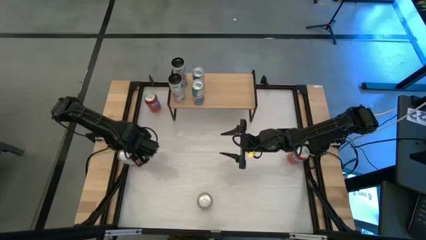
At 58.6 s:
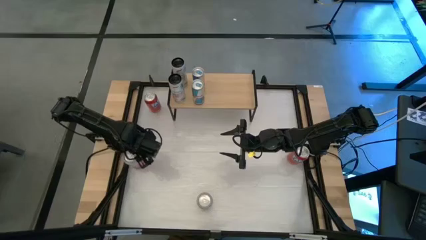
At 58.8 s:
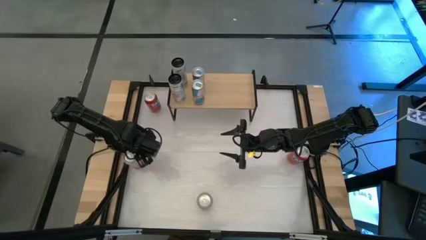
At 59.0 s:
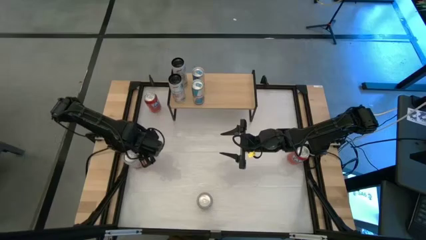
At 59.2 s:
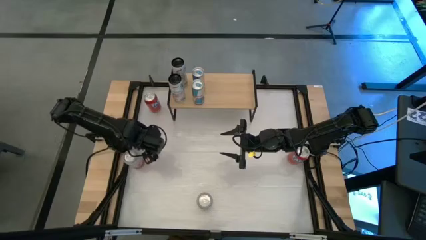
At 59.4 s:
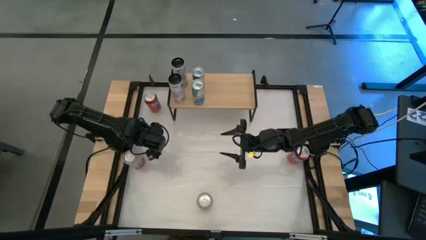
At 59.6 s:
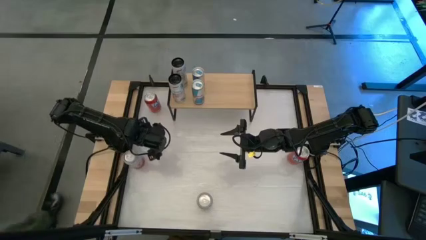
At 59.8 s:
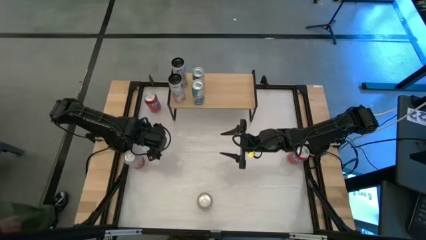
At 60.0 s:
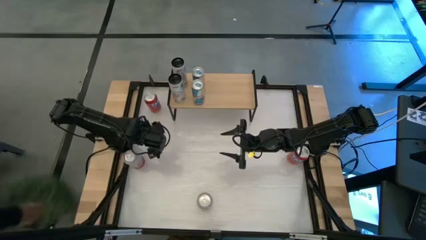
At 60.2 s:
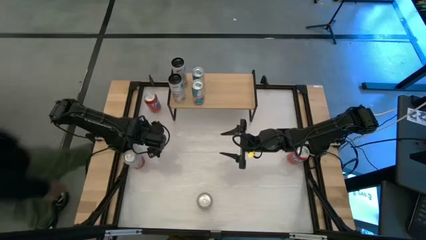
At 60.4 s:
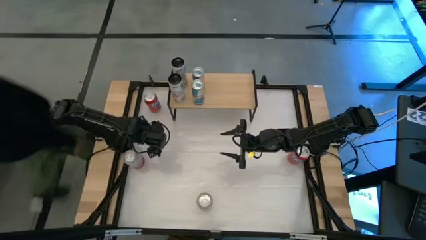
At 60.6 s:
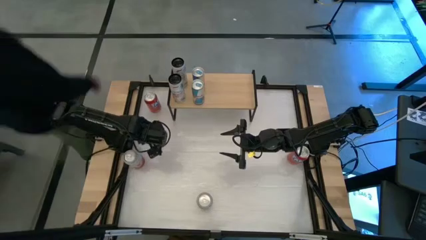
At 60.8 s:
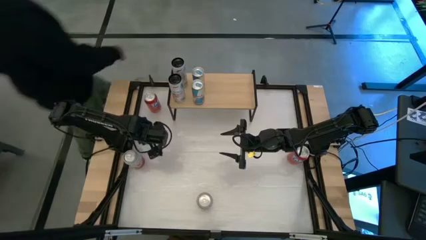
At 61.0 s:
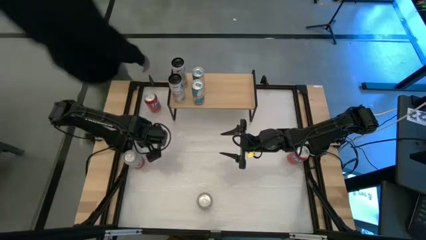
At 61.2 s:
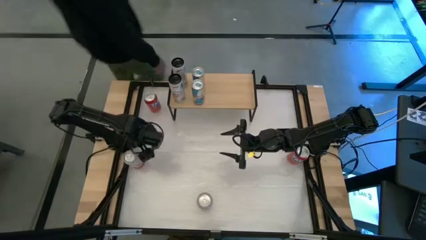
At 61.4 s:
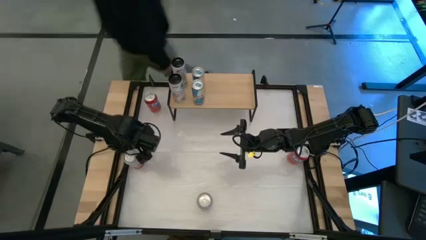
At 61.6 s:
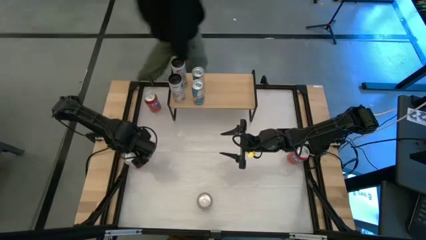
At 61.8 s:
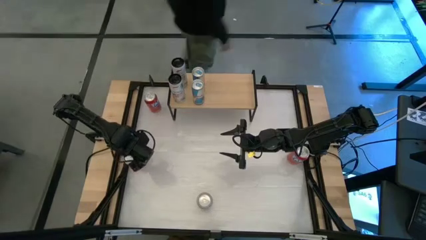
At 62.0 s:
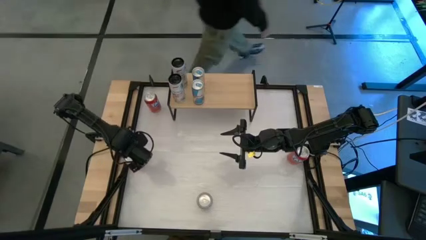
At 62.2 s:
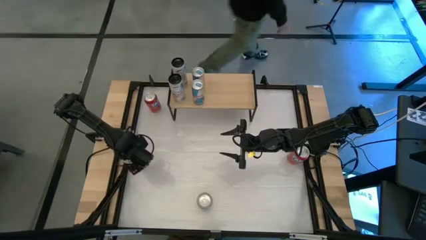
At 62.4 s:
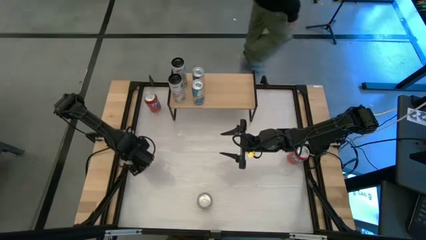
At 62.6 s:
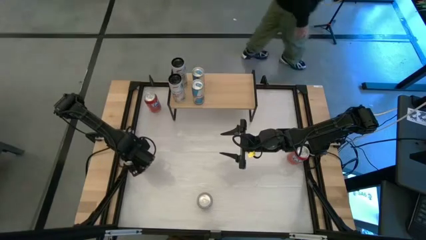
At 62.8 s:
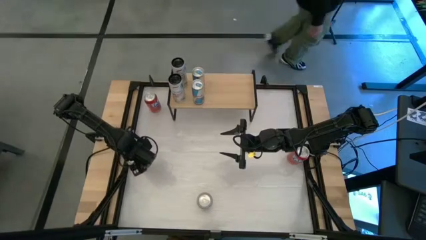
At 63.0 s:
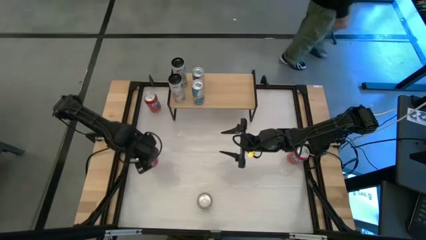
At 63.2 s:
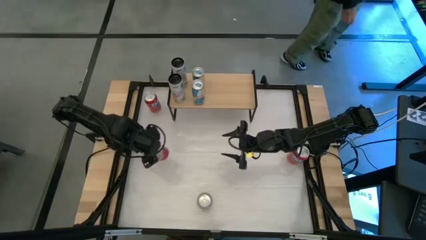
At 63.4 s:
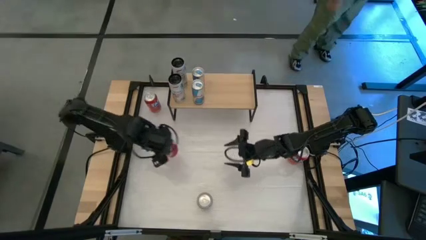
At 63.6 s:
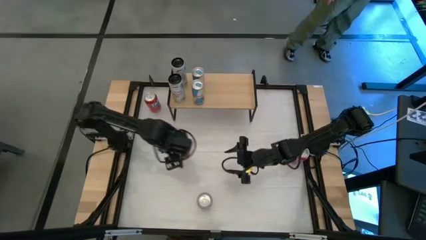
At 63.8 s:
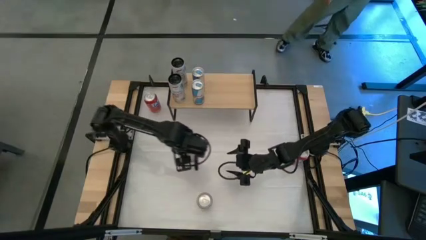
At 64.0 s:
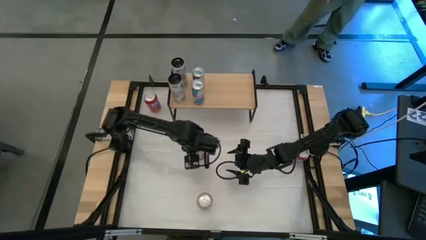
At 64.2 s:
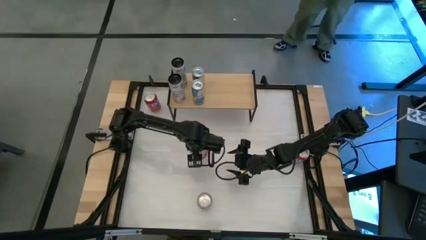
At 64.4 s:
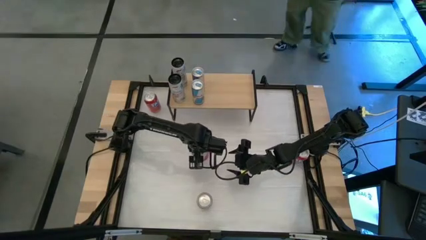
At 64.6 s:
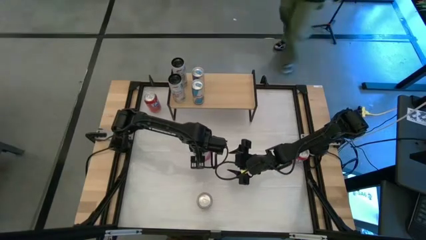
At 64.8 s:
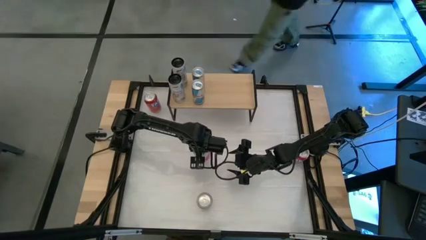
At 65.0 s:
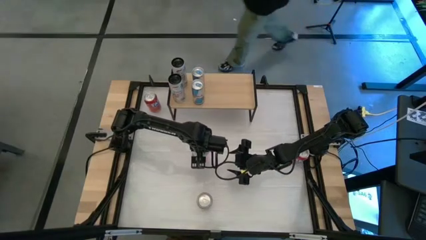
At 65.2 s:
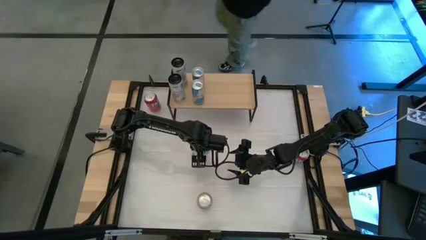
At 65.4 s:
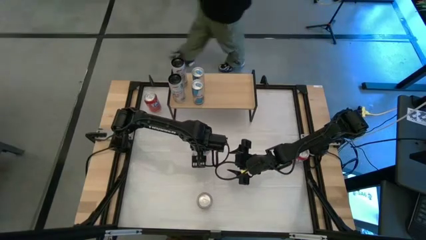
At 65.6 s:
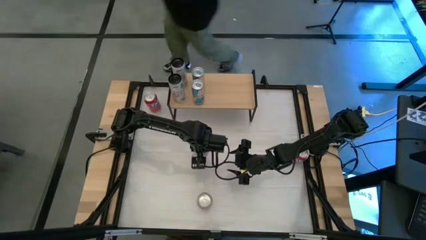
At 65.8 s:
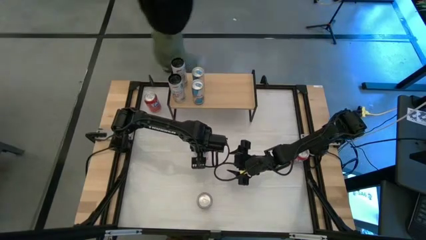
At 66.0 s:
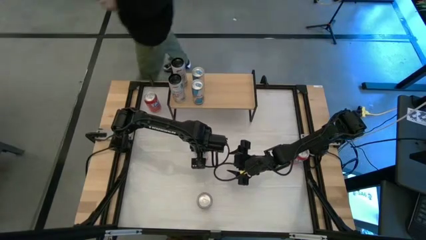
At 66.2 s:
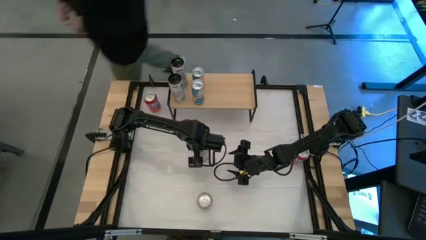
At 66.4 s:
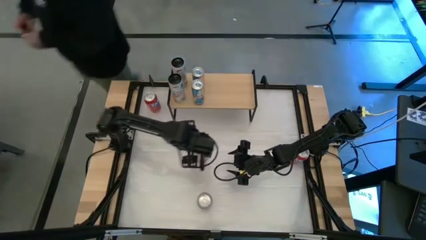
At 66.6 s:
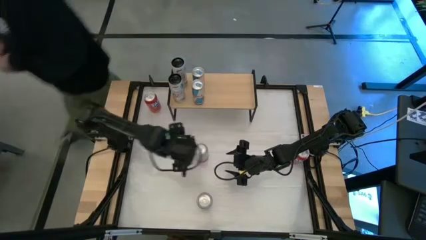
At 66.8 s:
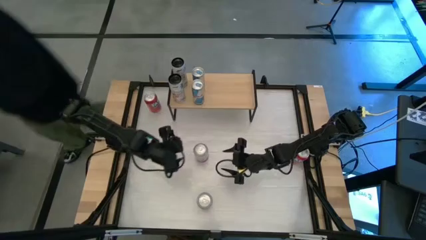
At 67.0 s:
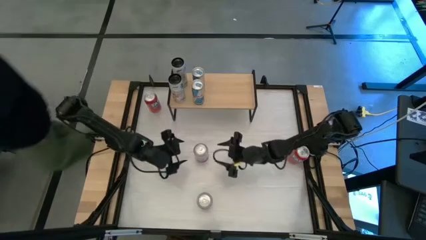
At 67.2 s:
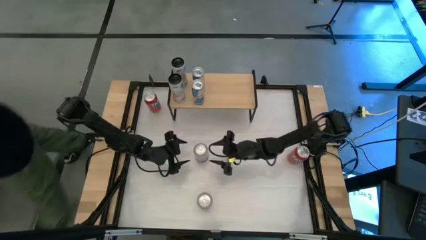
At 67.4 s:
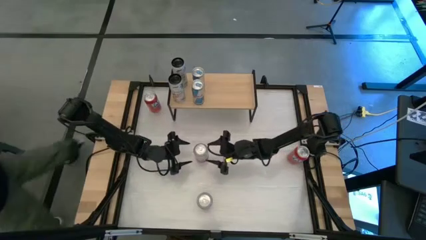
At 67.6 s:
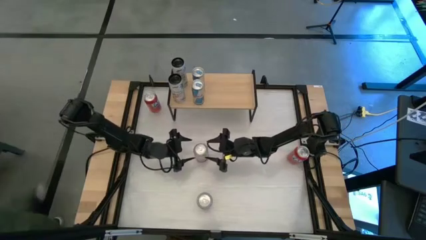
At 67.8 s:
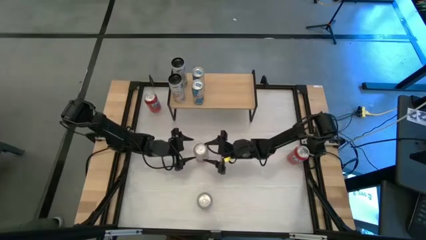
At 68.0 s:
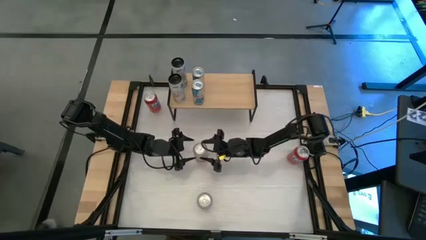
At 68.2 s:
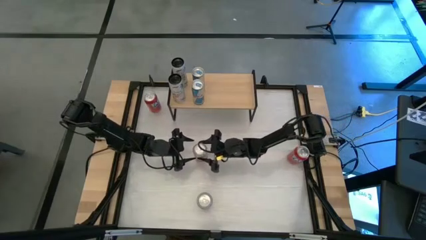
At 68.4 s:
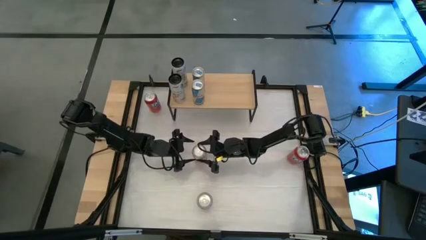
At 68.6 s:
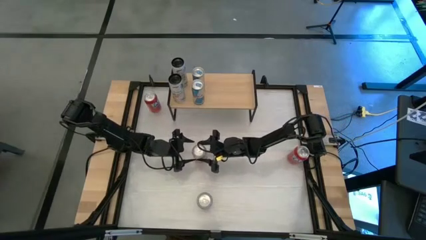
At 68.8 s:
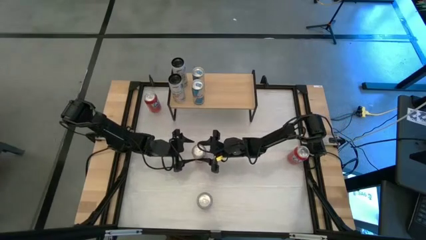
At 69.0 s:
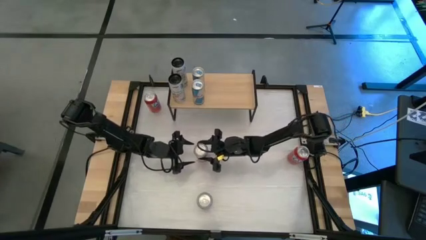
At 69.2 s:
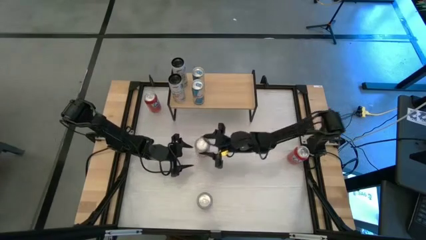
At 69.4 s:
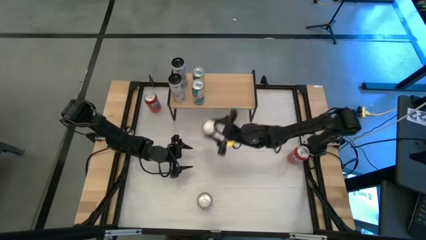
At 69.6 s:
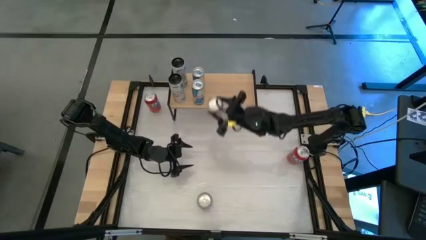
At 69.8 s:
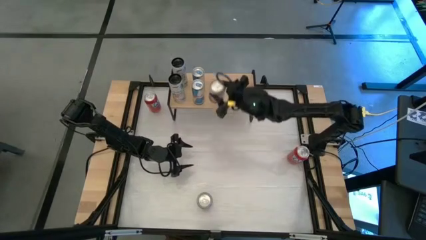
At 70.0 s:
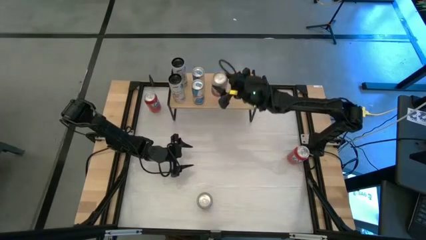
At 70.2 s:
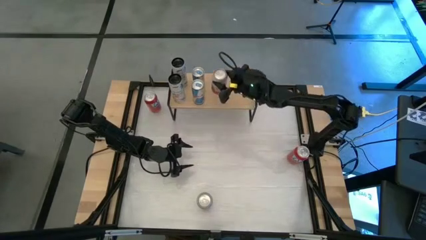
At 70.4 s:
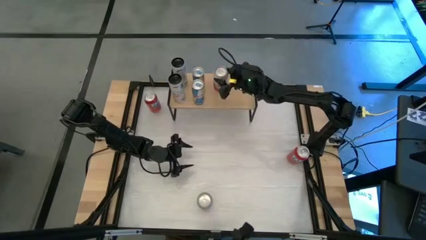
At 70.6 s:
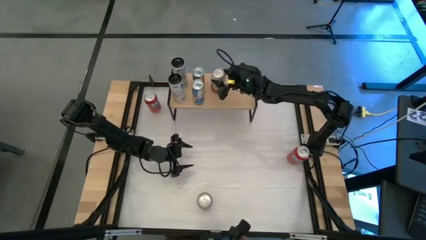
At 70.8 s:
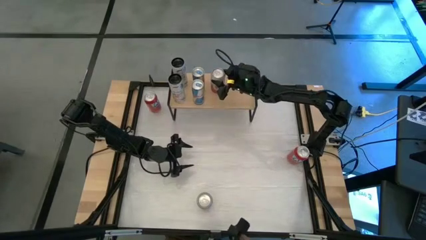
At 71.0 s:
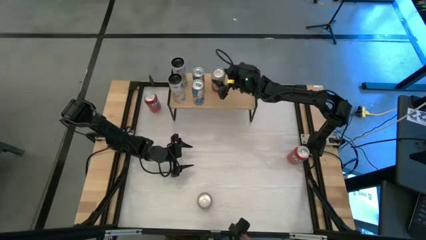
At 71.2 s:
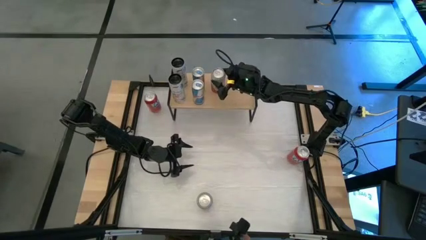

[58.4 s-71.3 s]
Task: Place canned beverage on shelf
Put the top pink-white soda can on the shelf
